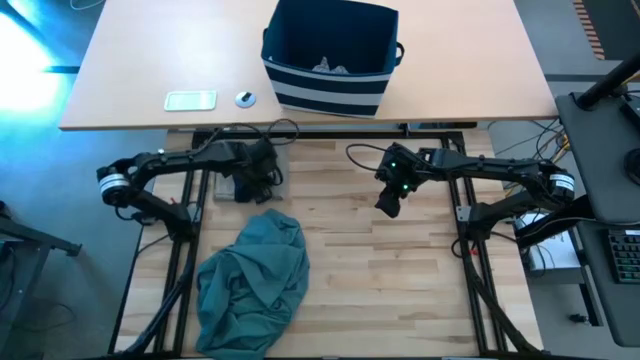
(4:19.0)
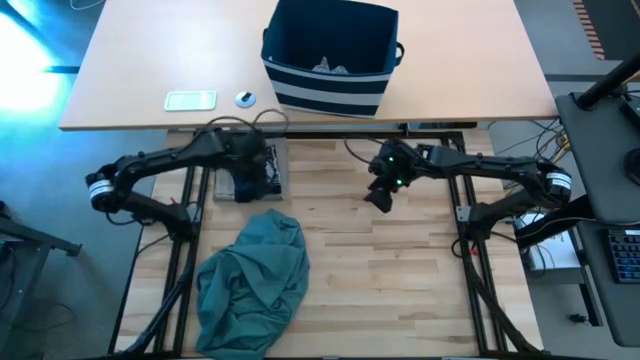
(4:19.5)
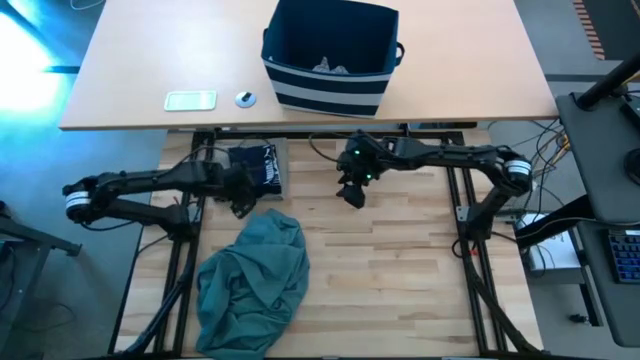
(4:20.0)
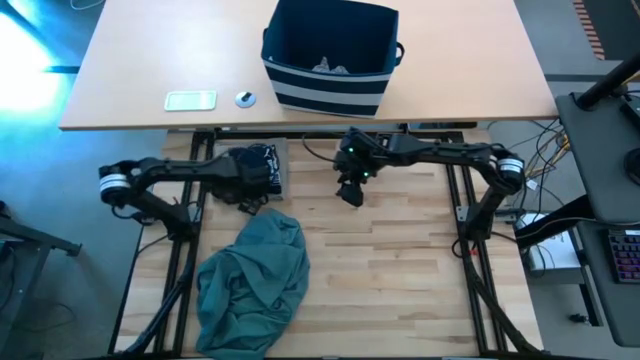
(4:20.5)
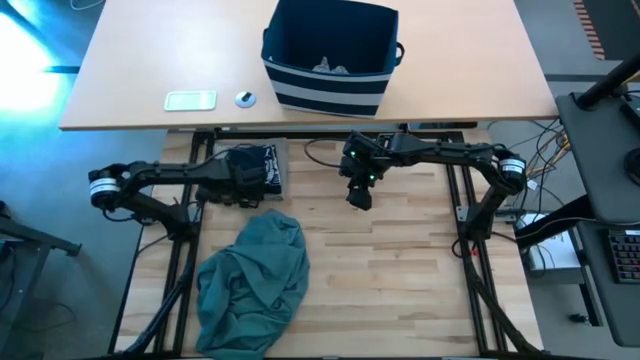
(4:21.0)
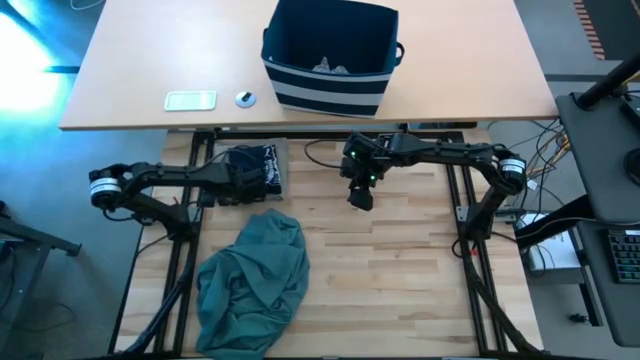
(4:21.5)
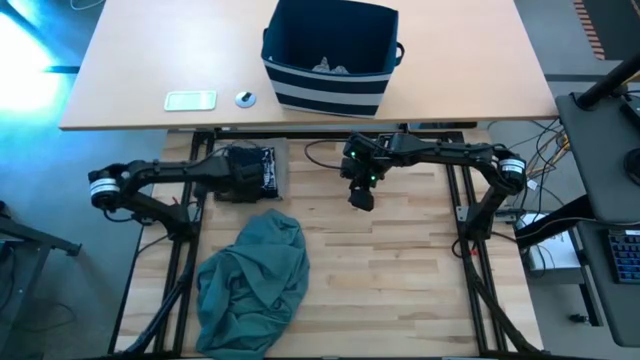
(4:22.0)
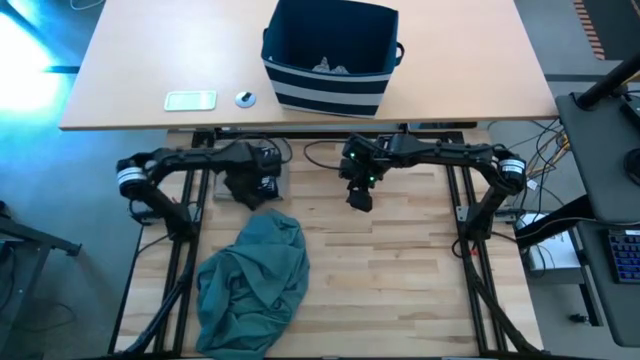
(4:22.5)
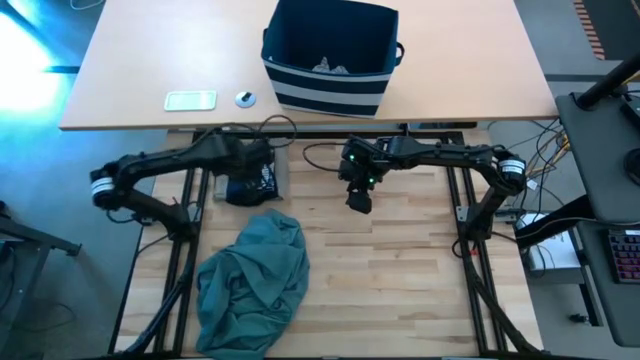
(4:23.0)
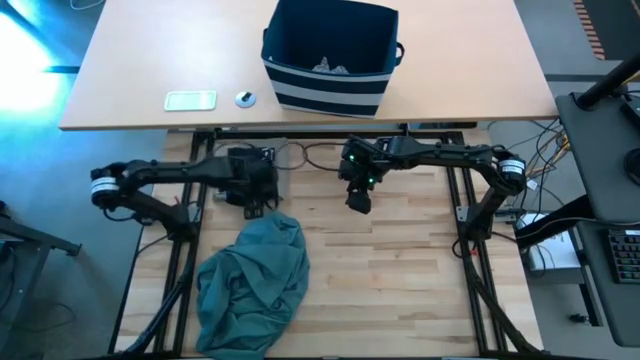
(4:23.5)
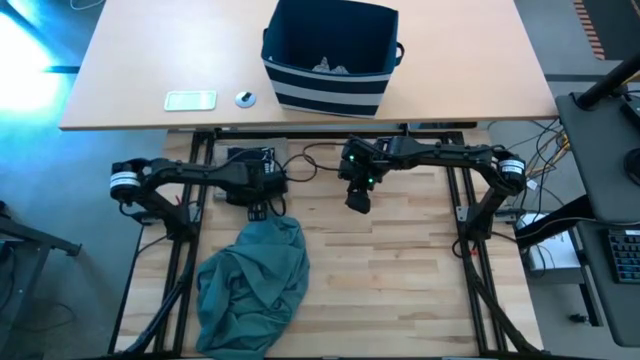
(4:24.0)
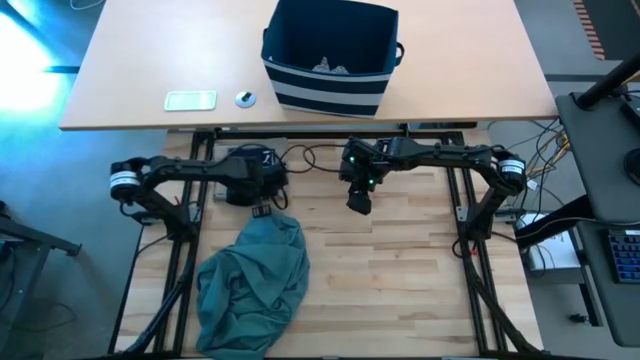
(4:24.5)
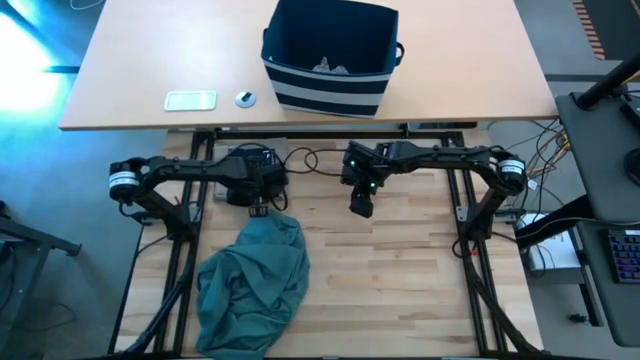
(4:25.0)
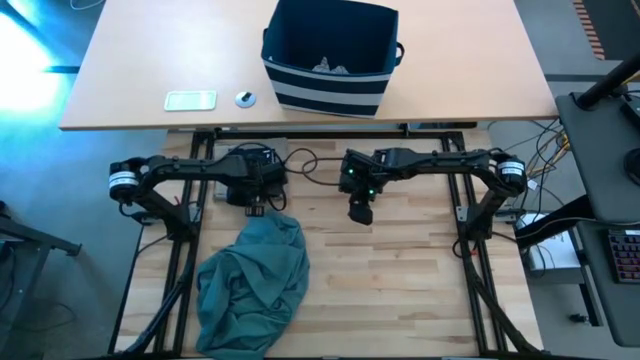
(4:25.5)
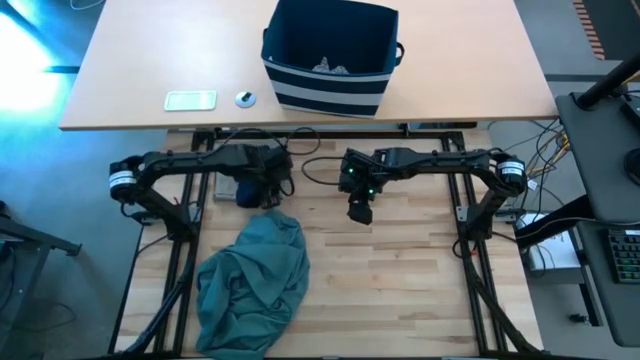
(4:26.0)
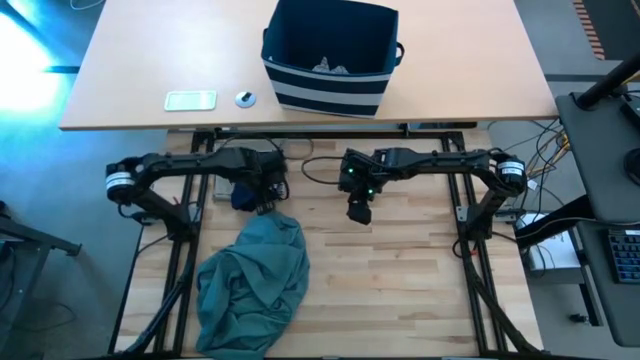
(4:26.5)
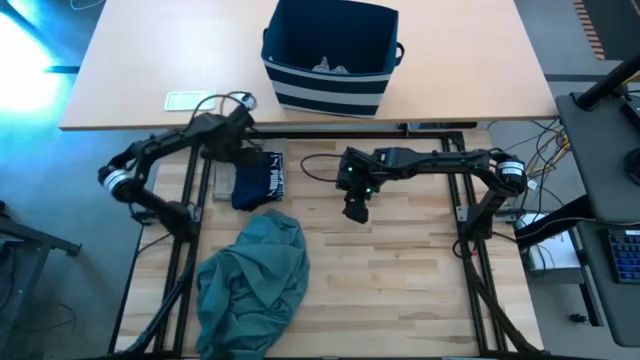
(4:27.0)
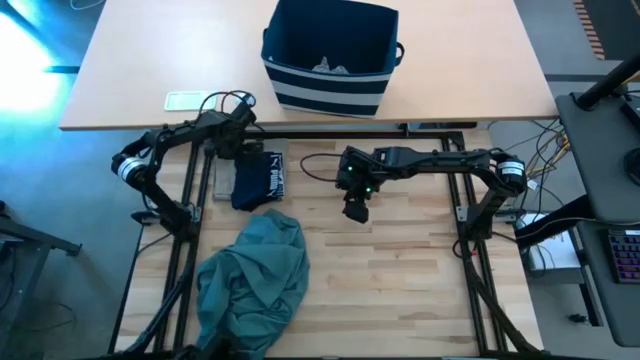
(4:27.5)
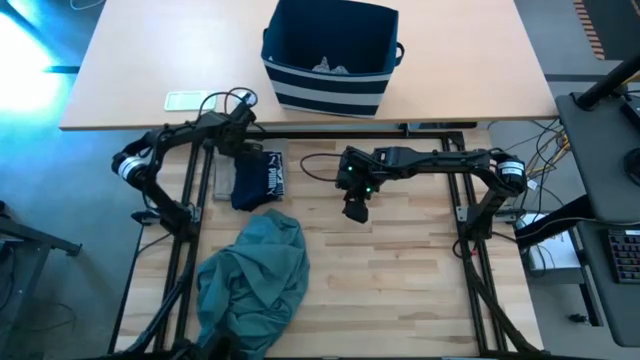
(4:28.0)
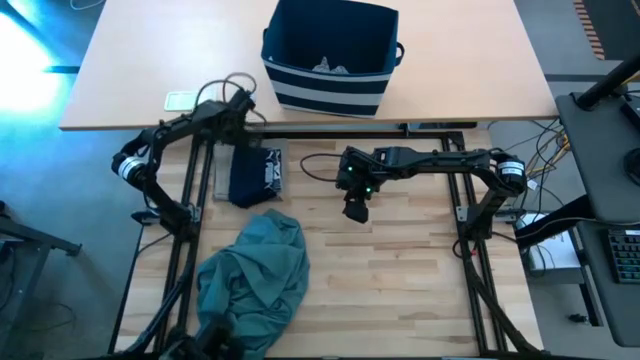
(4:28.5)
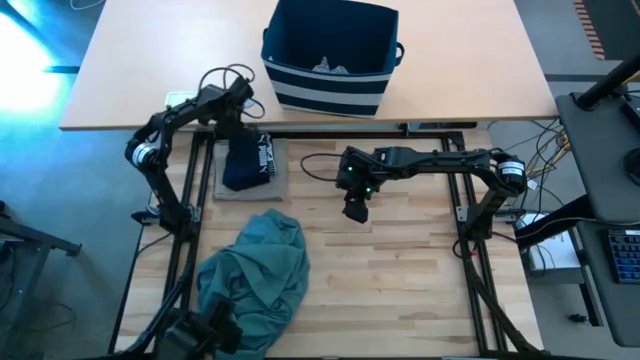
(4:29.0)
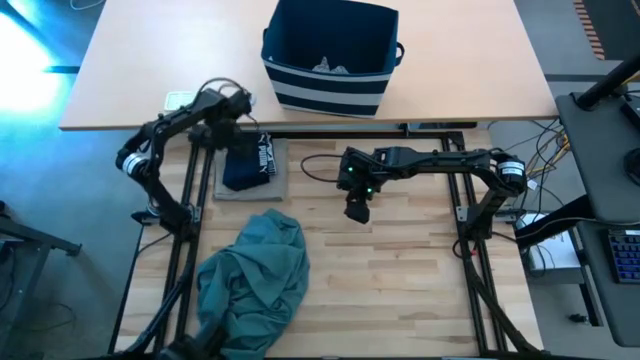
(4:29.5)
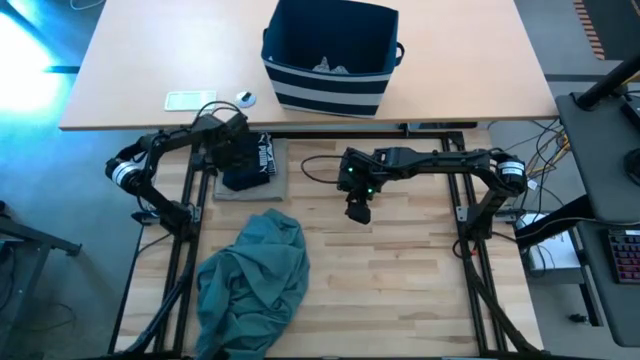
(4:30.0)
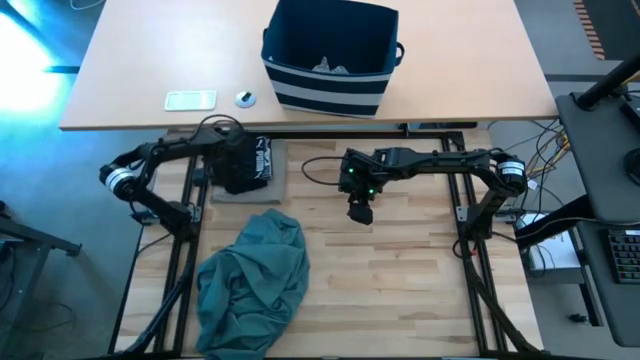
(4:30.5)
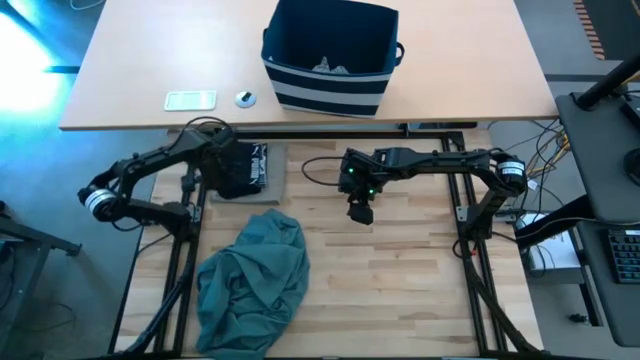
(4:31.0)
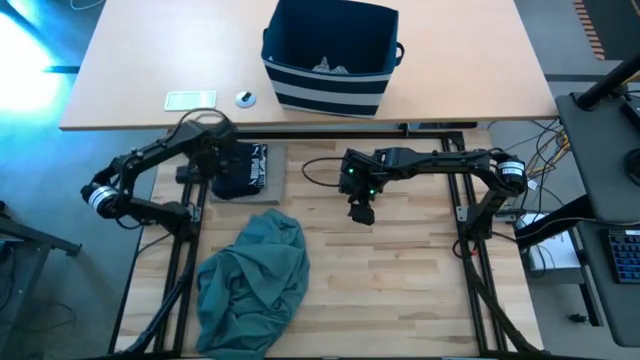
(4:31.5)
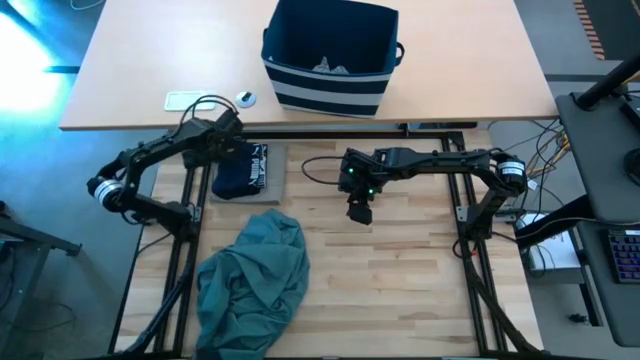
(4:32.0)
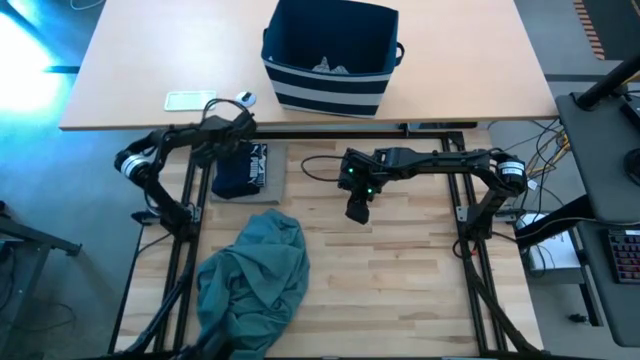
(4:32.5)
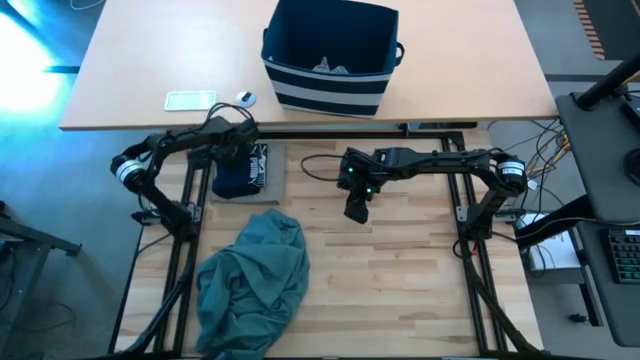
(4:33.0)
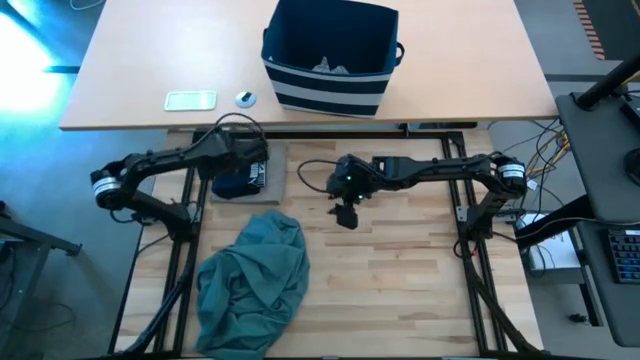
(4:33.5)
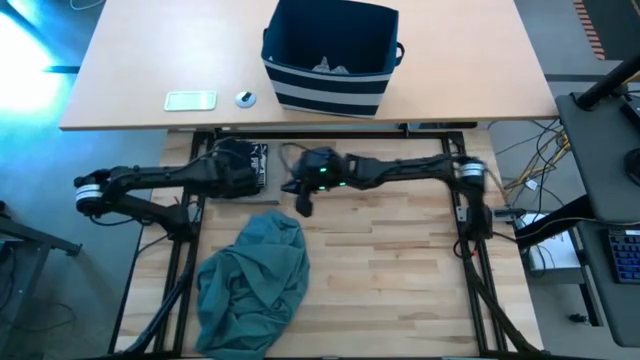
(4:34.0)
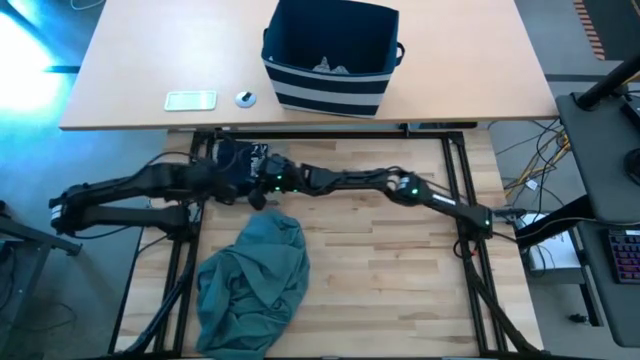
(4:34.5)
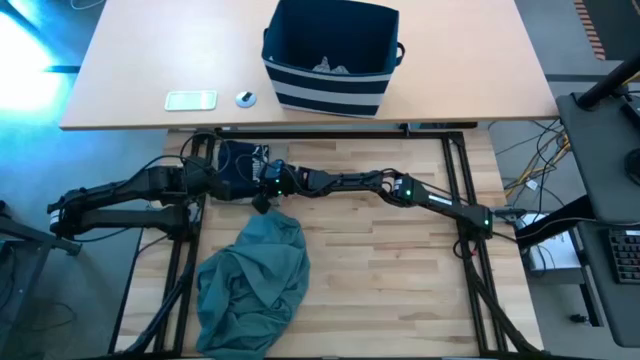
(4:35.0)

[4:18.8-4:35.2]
Task: Fold Laundry from Bin
Stack the folded black underwear on the folded brown shorts

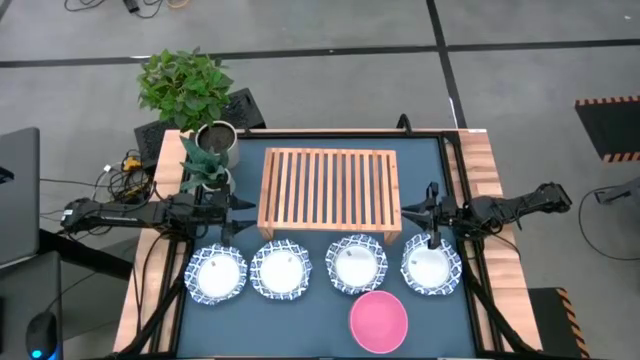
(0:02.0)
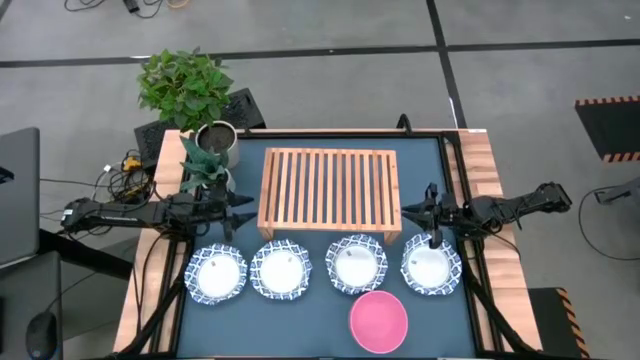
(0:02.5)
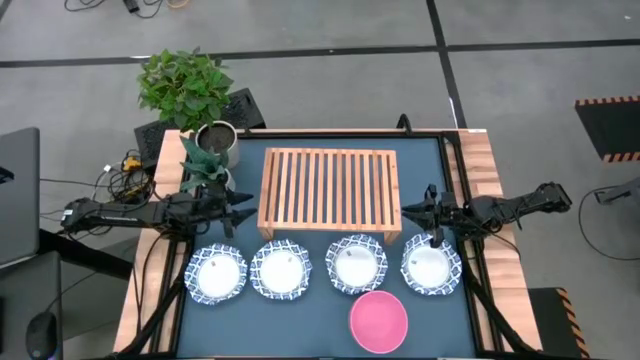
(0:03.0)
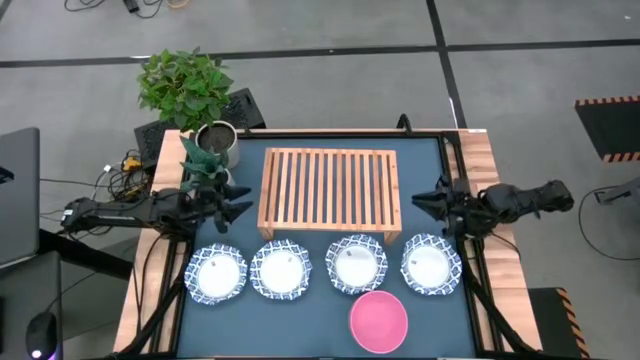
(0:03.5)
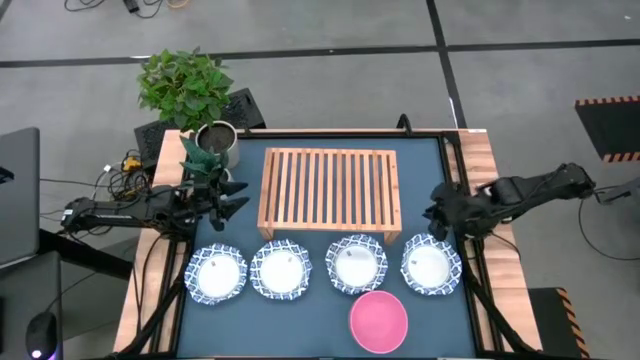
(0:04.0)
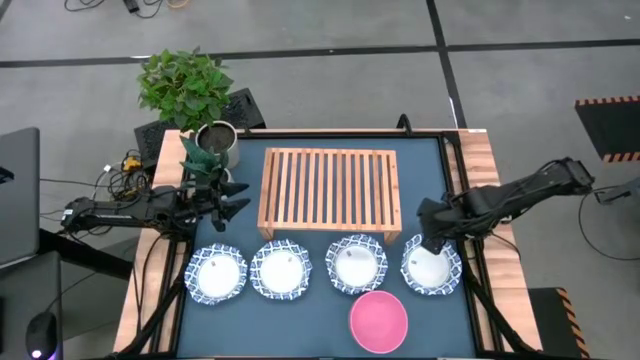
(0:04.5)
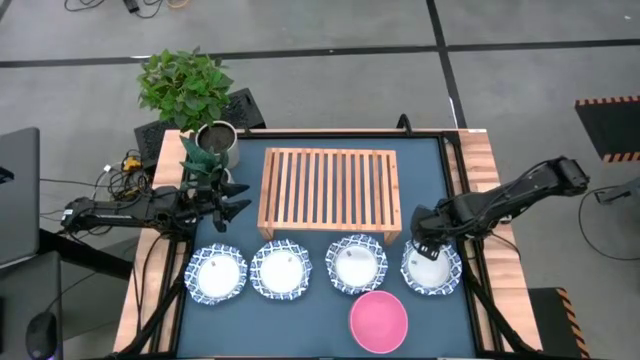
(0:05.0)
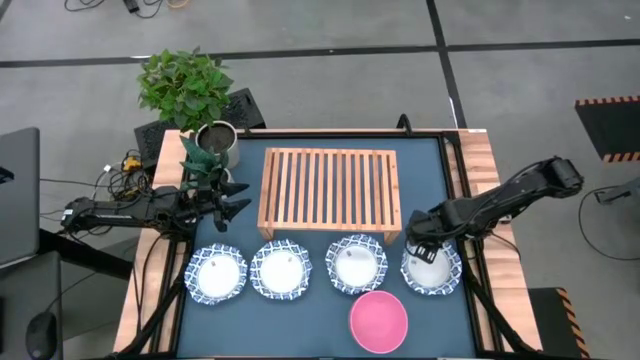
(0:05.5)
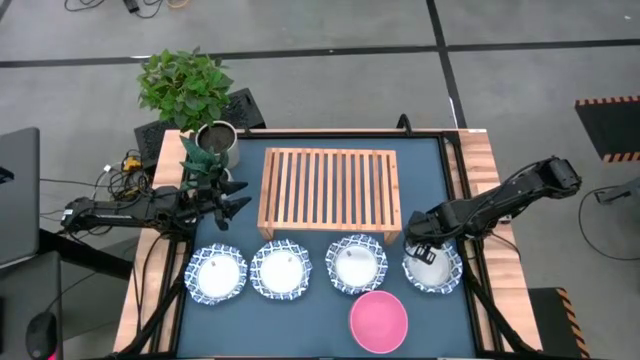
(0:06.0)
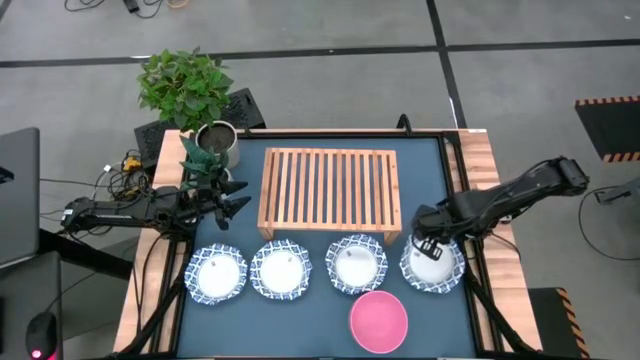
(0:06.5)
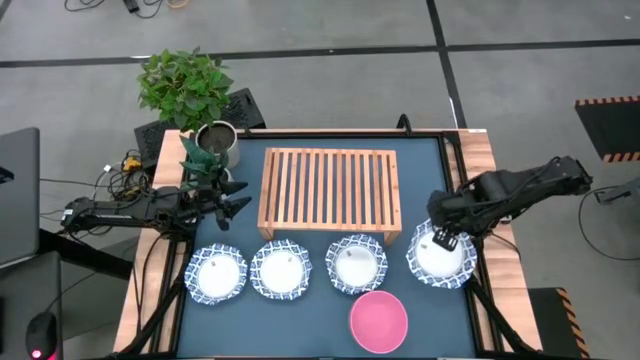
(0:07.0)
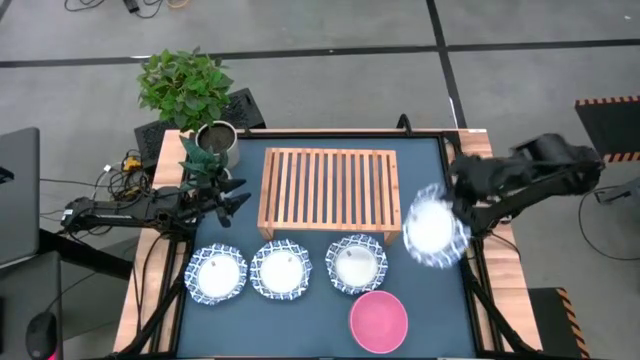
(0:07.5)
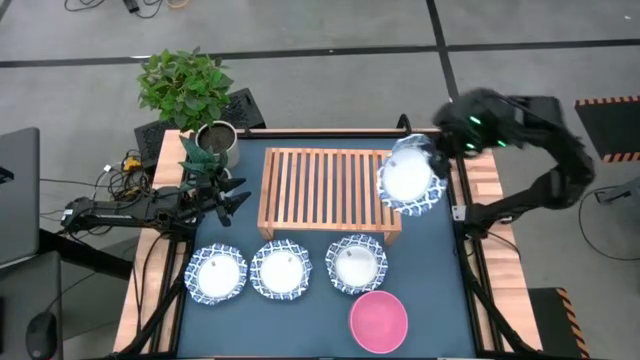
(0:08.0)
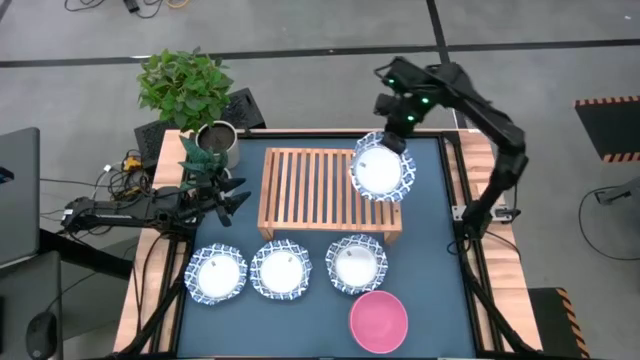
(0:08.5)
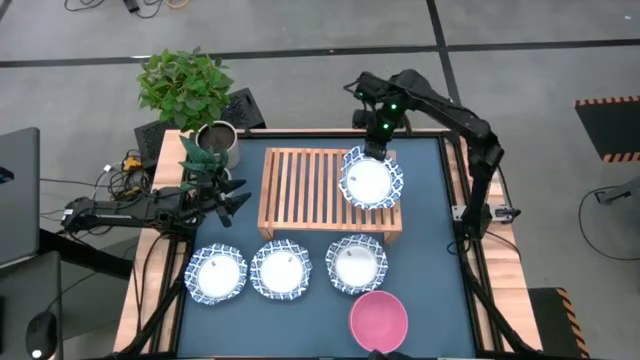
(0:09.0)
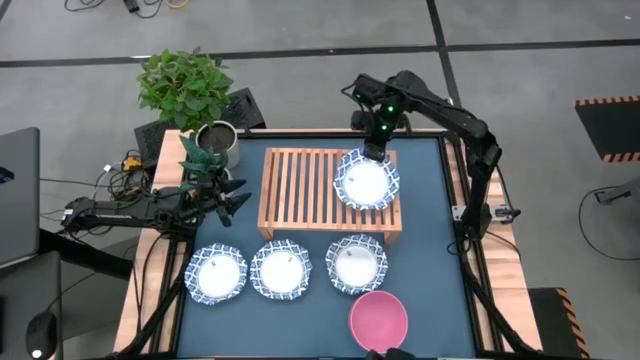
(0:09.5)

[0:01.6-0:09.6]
Task: Place and stack bowls onto a shelf
Put the white patterned bowl on the shelf
